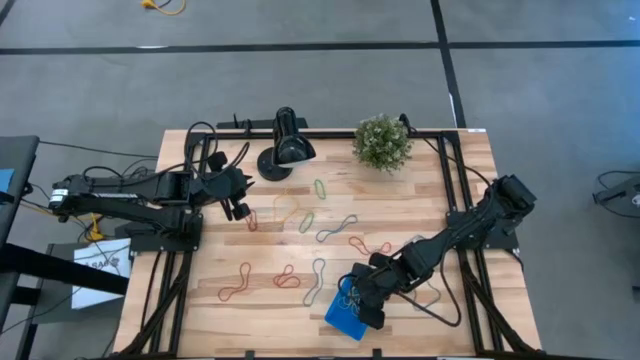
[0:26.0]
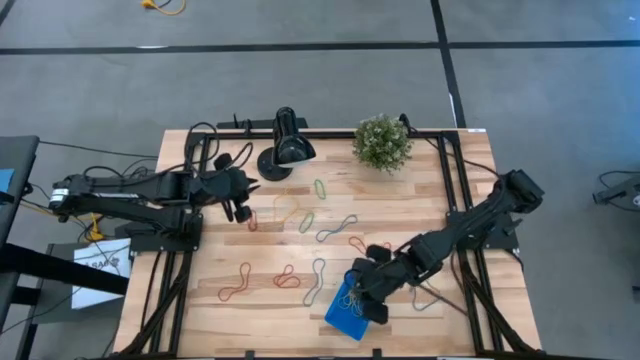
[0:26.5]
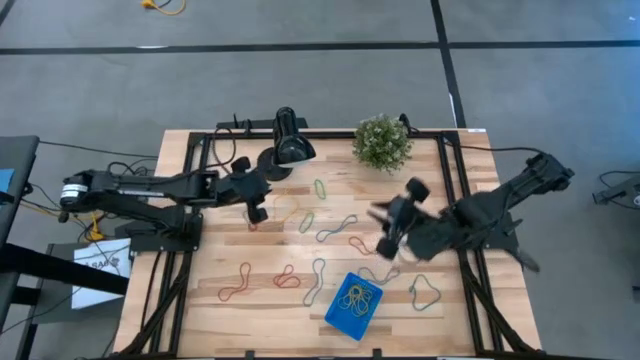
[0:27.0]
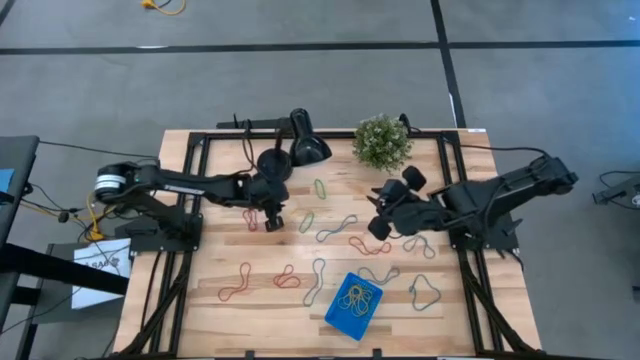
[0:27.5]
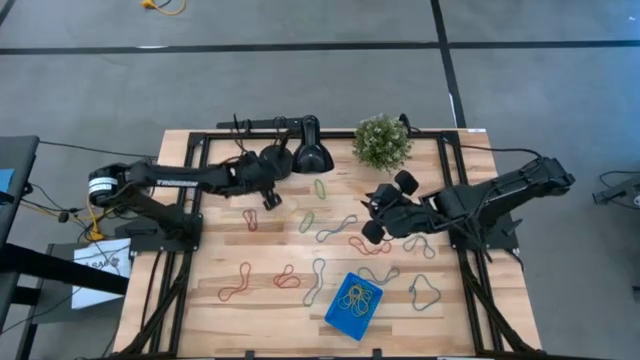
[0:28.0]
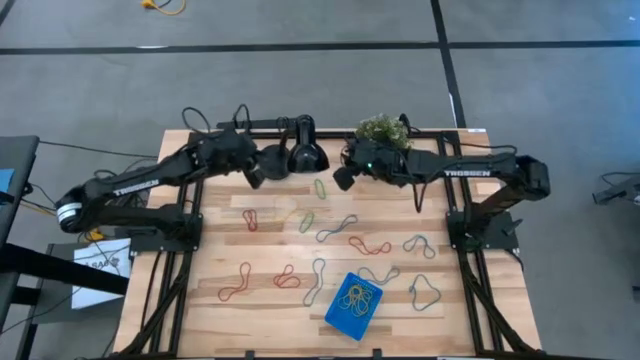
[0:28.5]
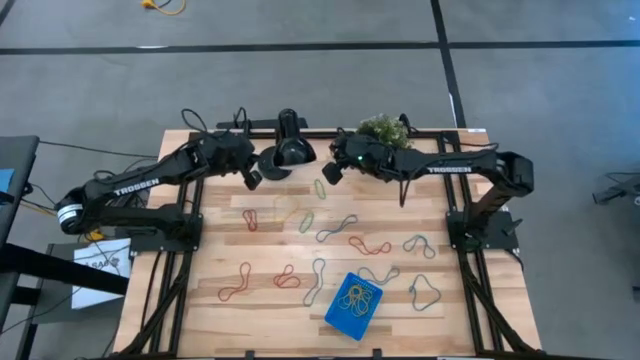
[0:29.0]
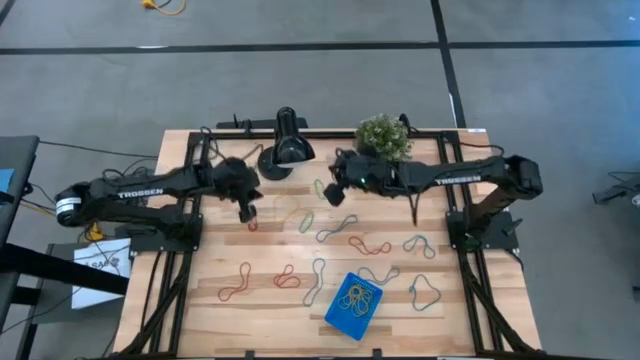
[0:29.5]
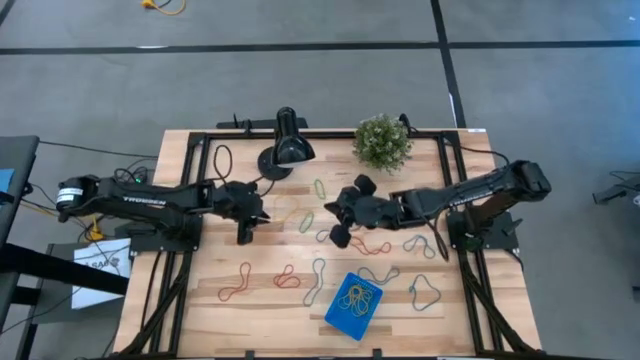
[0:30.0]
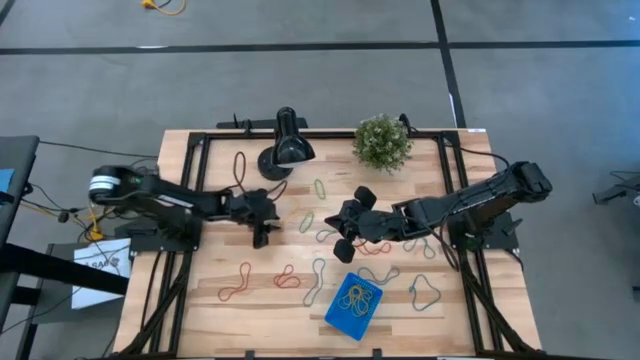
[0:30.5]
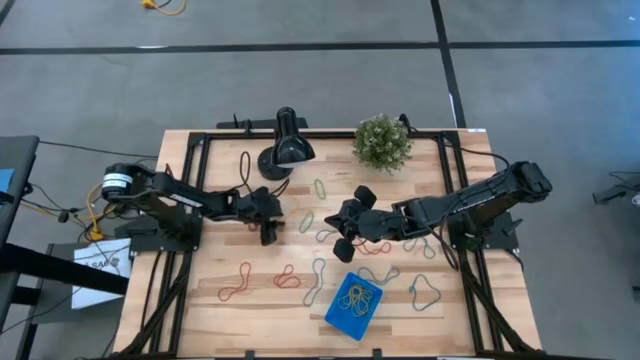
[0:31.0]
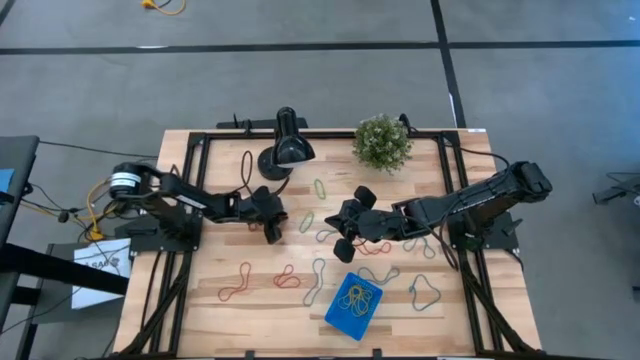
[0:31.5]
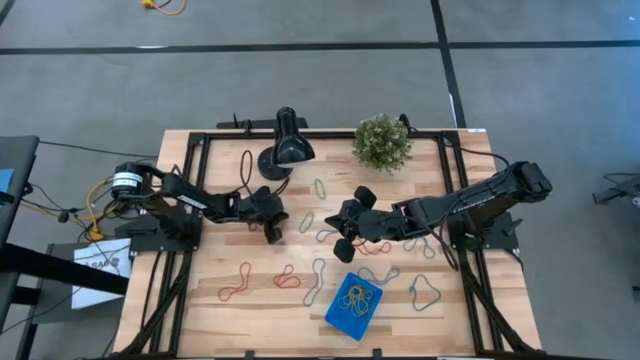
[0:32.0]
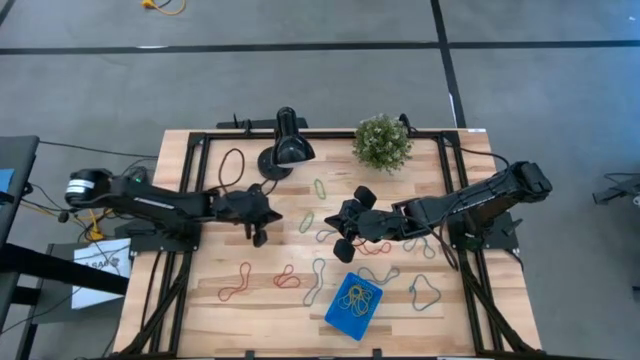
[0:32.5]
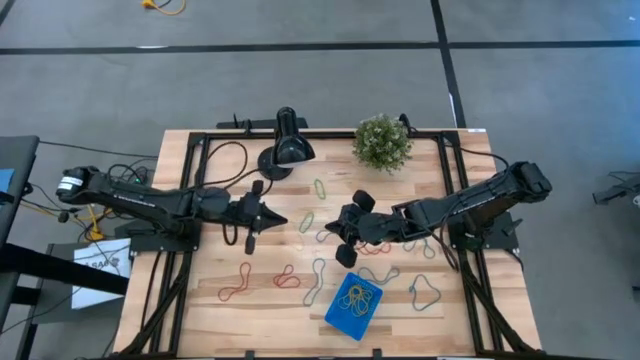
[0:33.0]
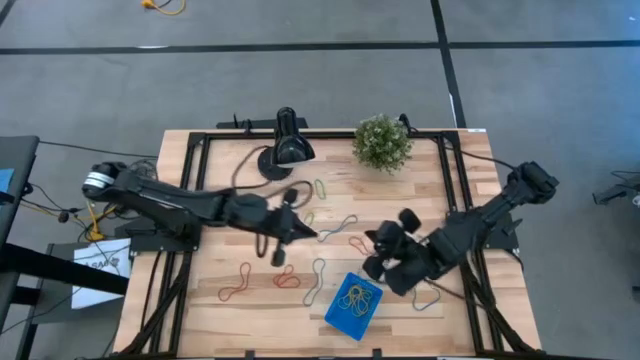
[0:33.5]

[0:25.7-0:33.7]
Task: Pick and place items into bin
Put the yellow rubber band into the blue bin

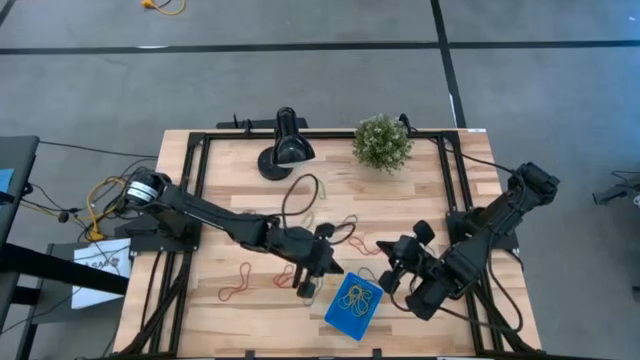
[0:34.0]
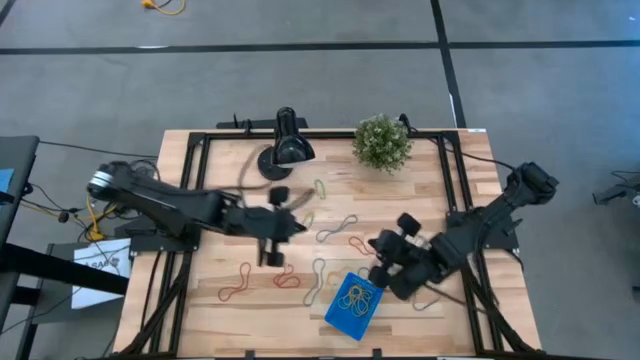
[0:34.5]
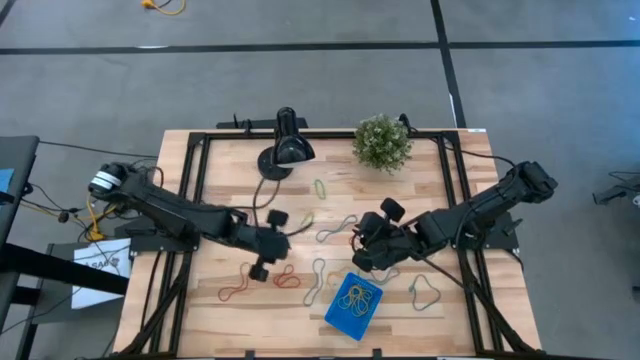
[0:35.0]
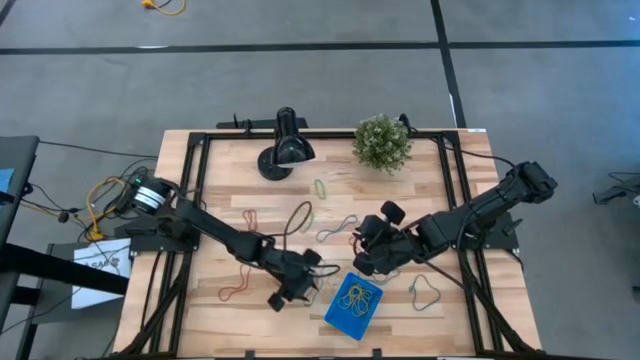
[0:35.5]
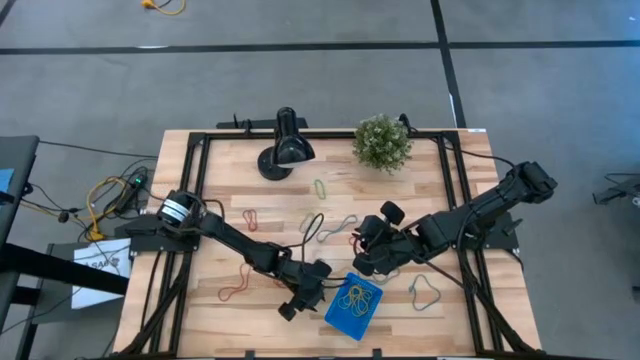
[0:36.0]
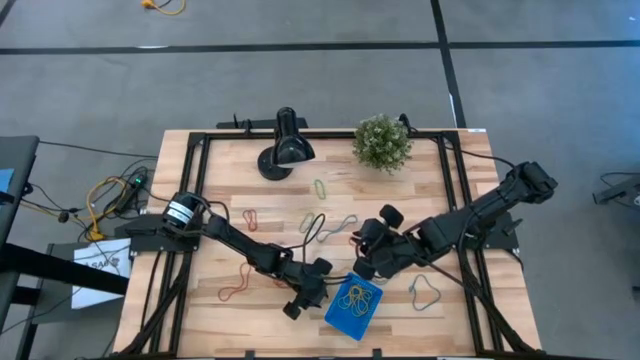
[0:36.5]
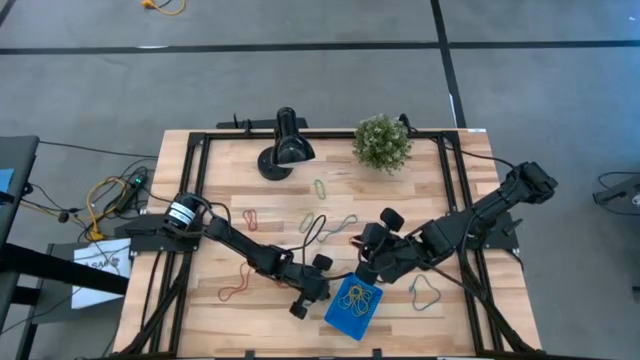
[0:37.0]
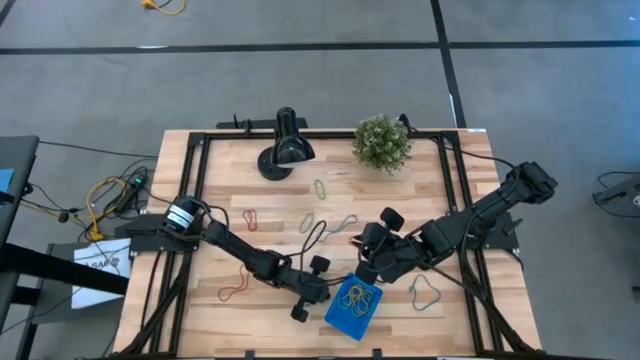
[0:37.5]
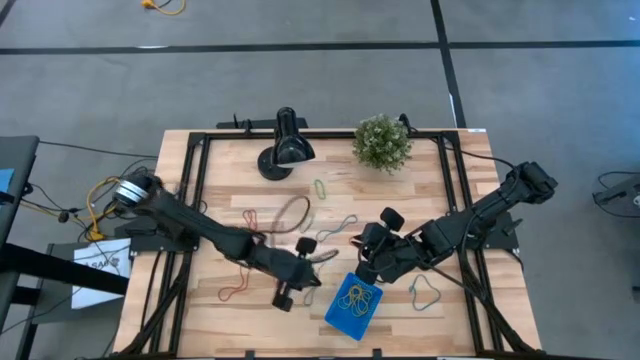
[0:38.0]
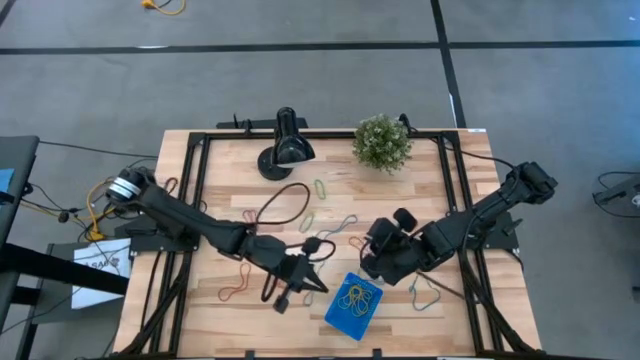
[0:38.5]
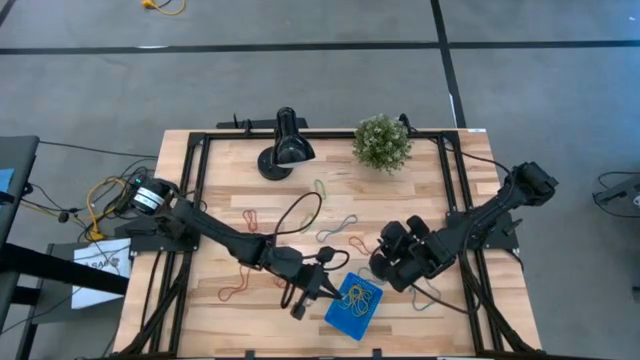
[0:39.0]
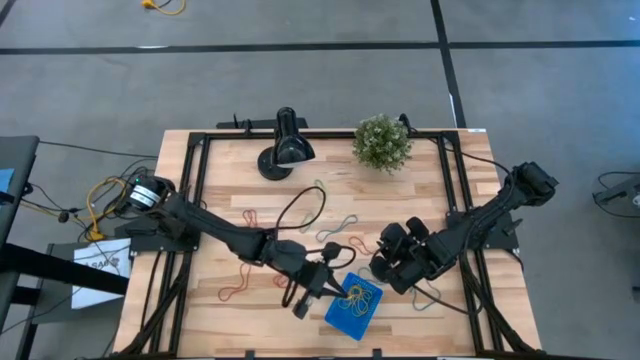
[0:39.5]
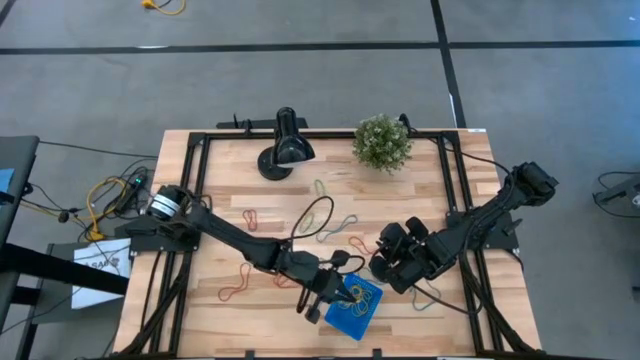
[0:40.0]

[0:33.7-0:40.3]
Put the yellow rubber band into the blue bin

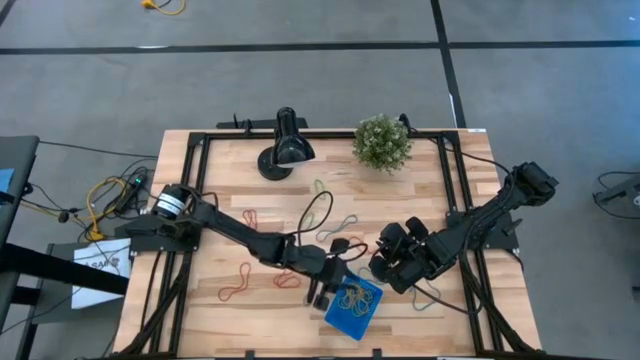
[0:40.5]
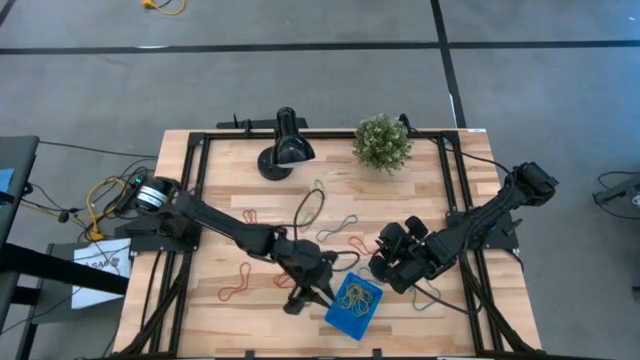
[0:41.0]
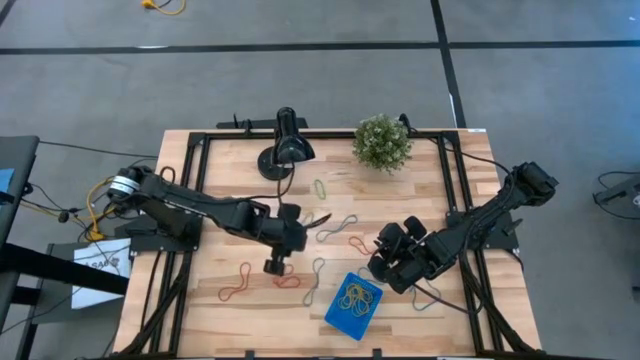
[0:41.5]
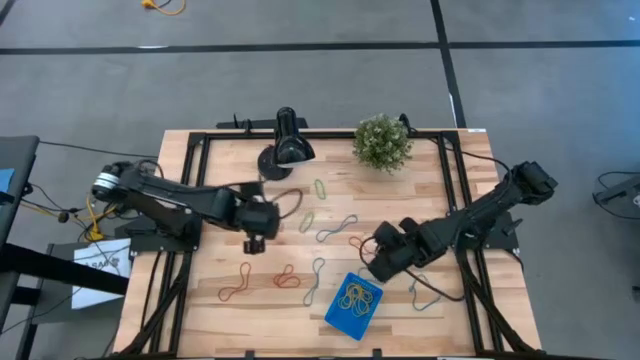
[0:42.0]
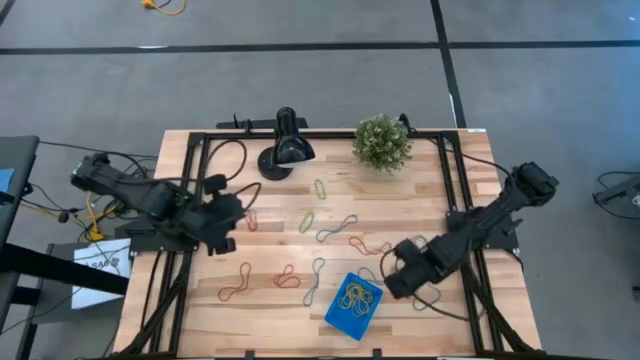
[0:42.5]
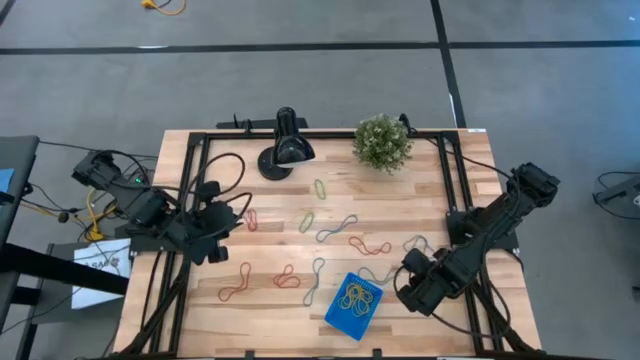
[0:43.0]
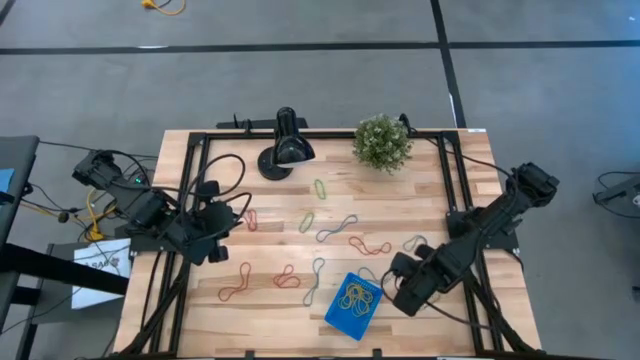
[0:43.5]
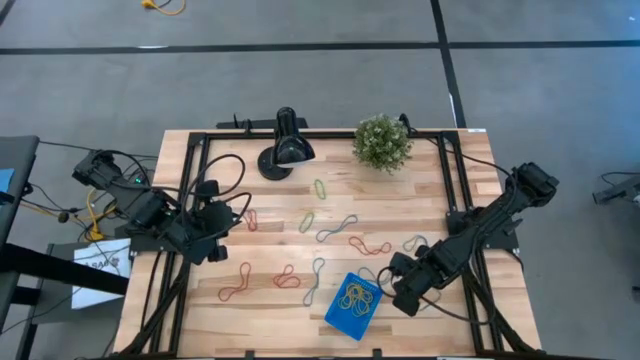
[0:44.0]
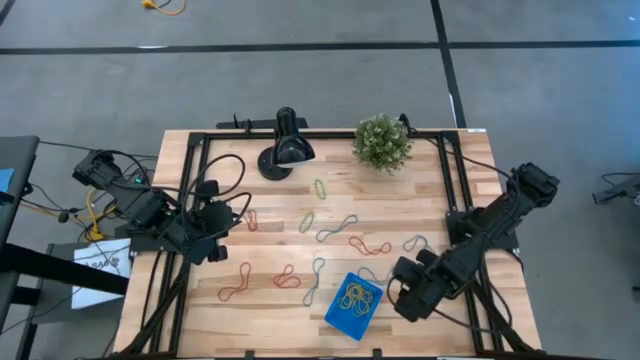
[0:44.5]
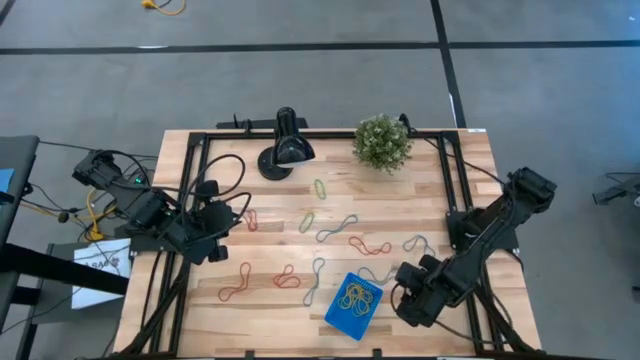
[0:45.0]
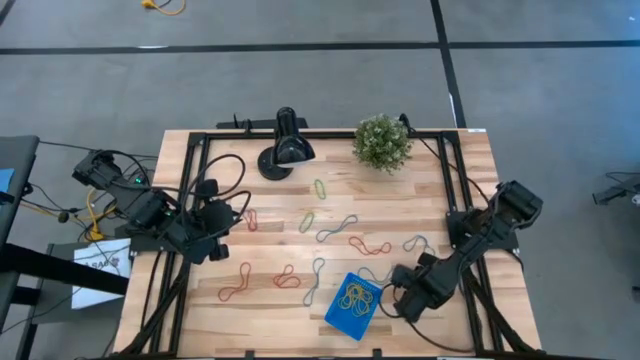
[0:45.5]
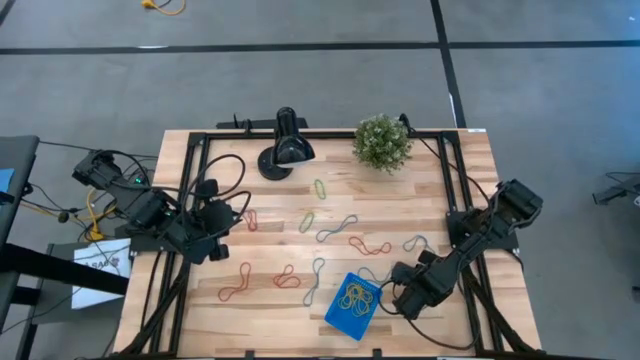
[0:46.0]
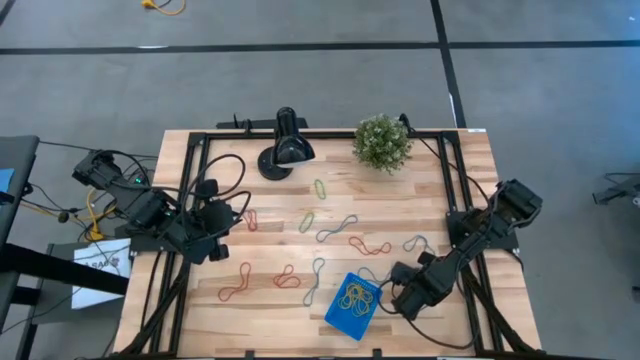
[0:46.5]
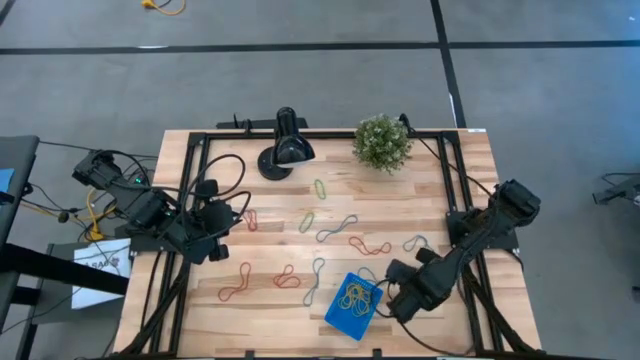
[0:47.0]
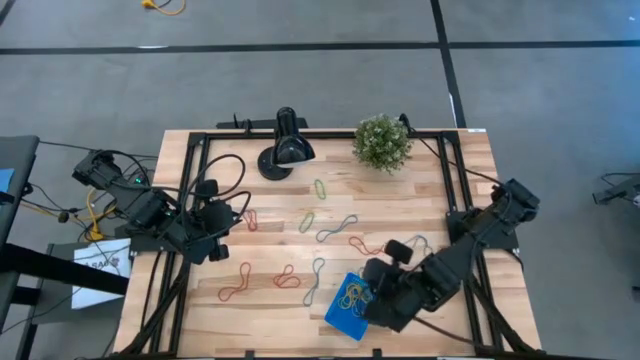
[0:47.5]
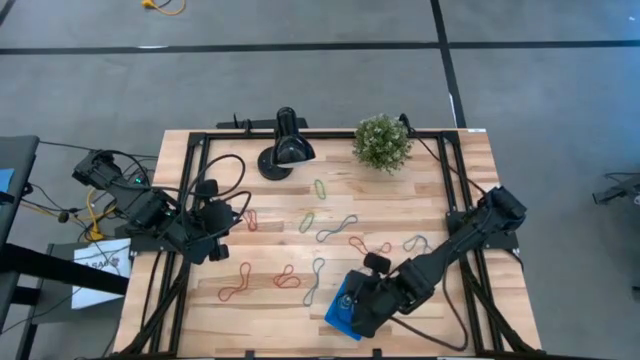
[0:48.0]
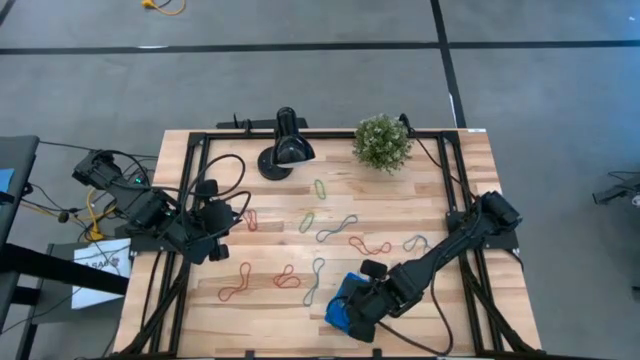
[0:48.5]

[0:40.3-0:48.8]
Put the blue rubber band into the blue bin
